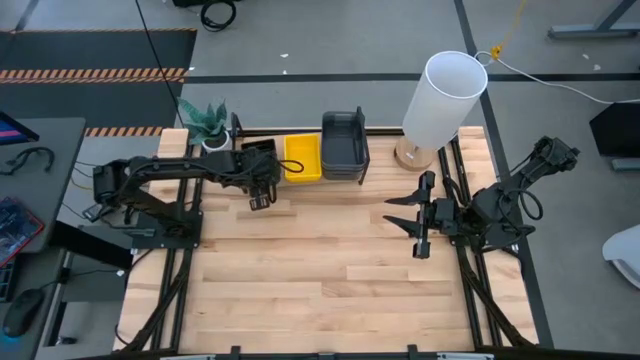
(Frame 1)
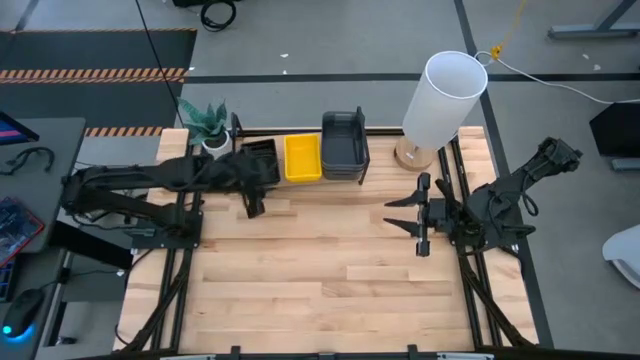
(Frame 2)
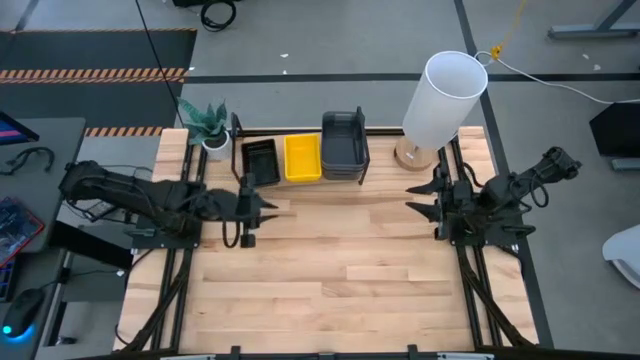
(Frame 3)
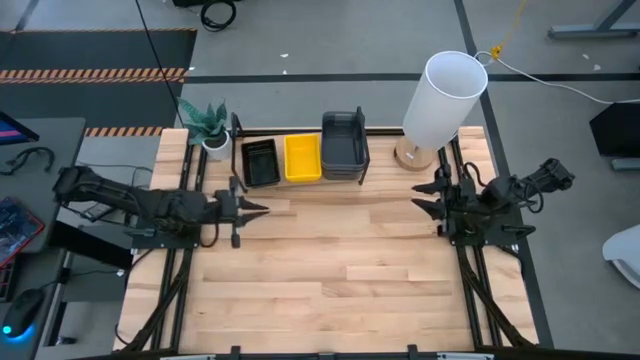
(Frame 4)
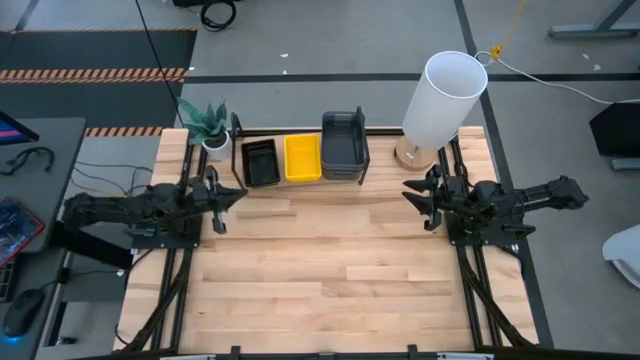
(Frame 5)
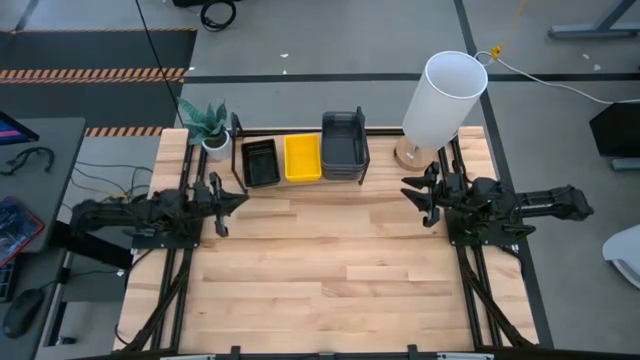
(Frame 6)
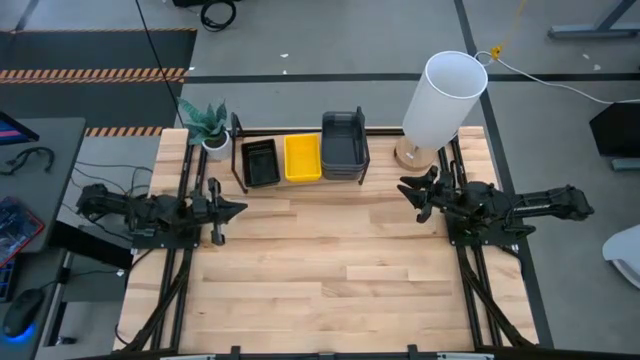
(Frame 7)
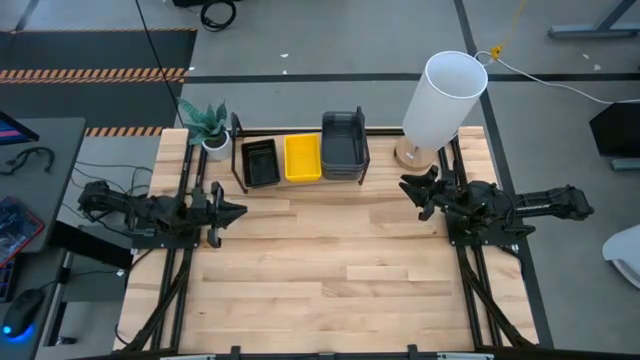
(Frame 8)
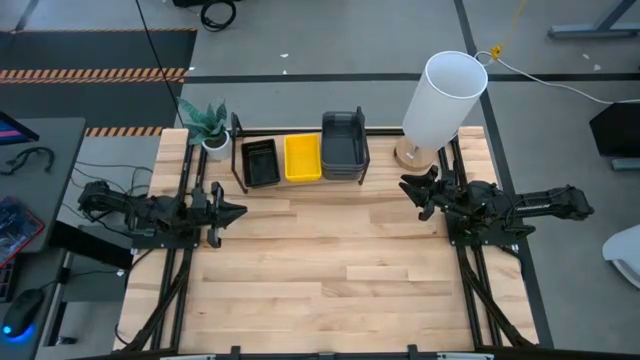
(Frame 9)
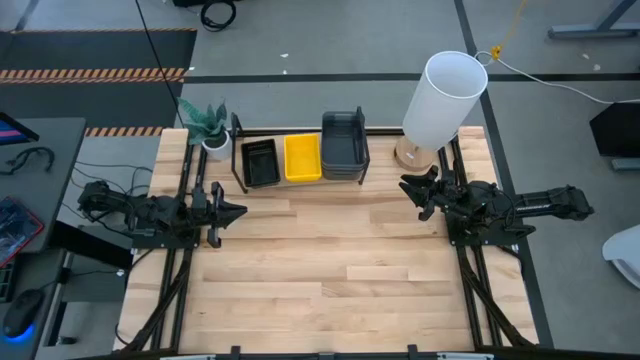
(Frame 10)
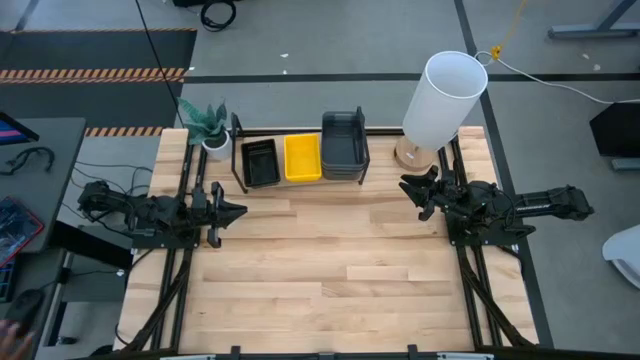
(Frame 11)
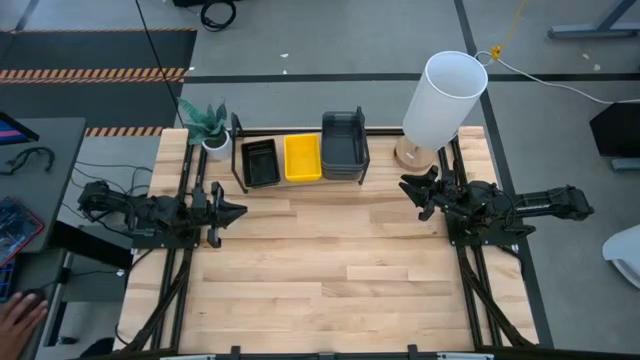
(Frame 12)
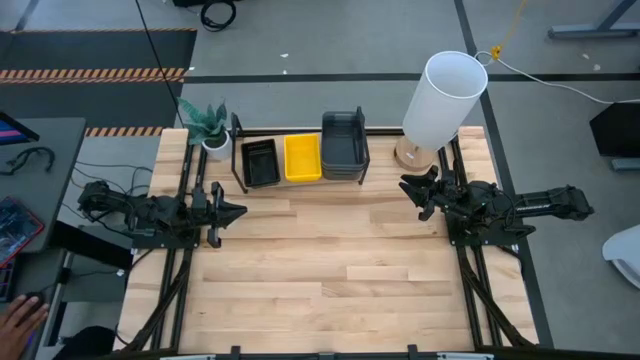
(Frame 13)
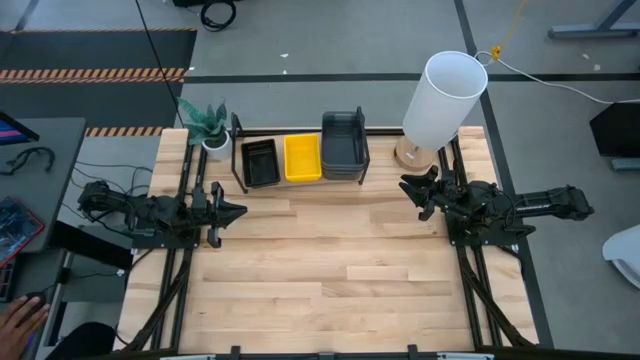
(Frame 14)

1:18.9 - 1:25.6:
Task: Stack baskets on shelf by color
Return to Home Position

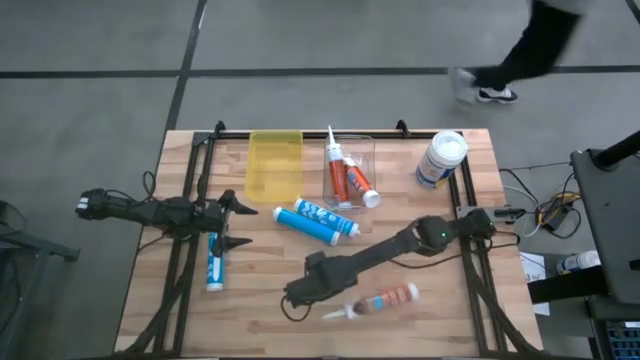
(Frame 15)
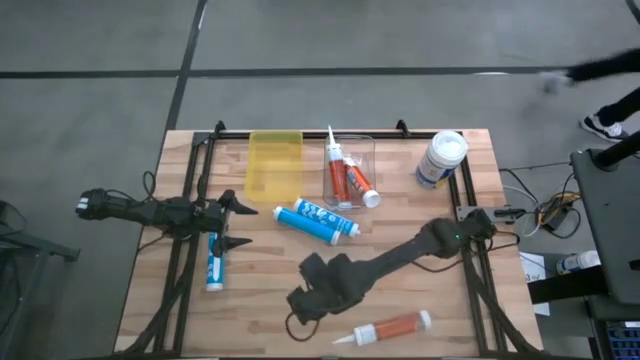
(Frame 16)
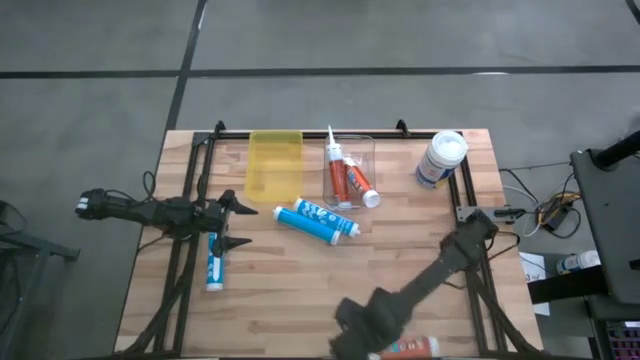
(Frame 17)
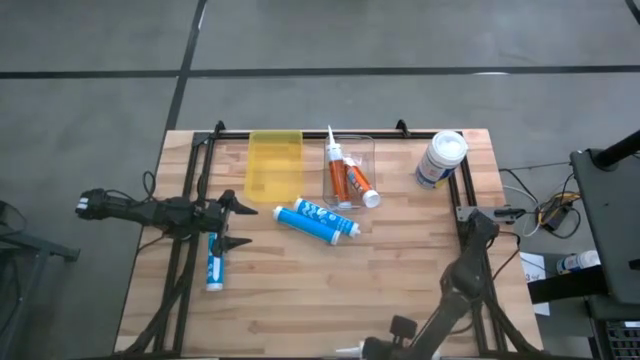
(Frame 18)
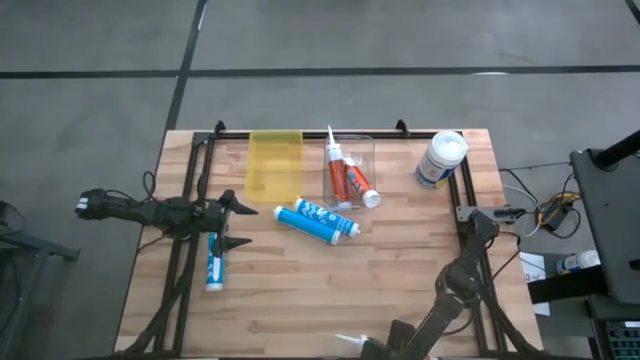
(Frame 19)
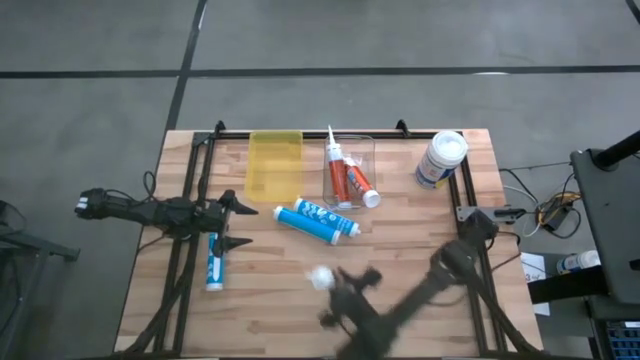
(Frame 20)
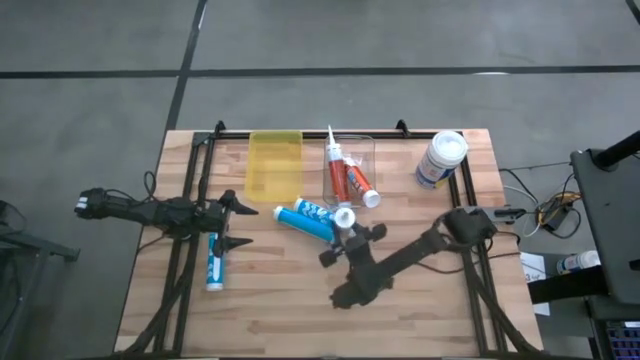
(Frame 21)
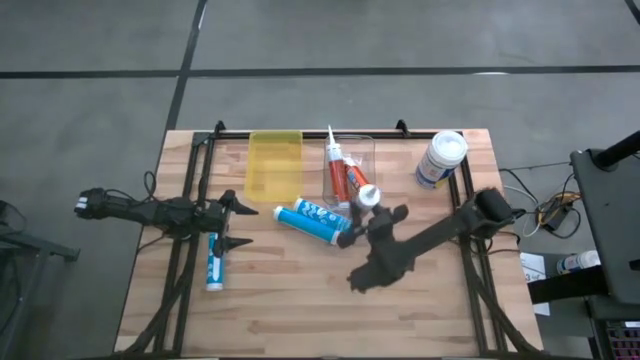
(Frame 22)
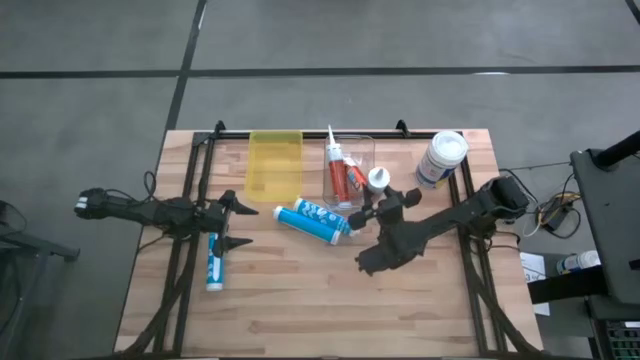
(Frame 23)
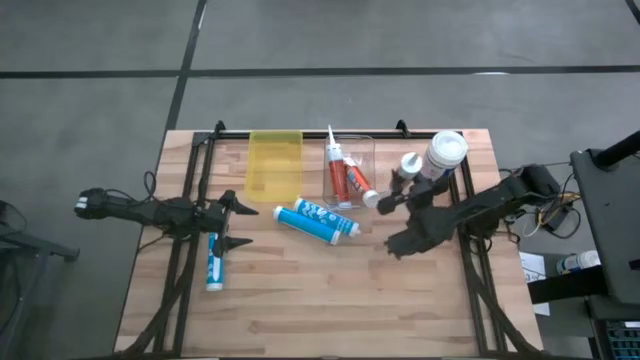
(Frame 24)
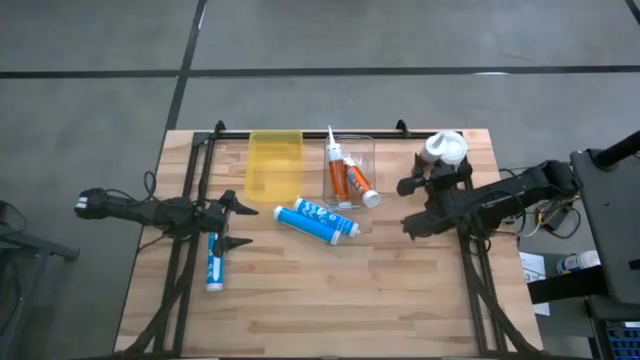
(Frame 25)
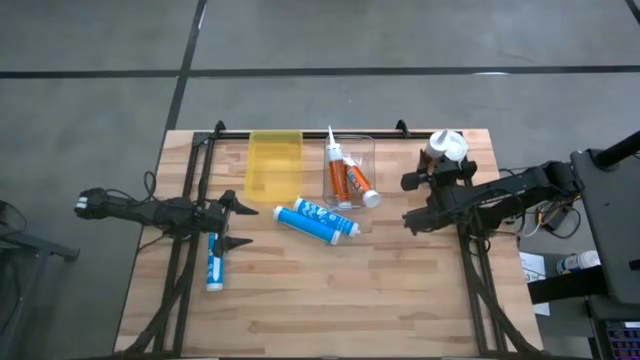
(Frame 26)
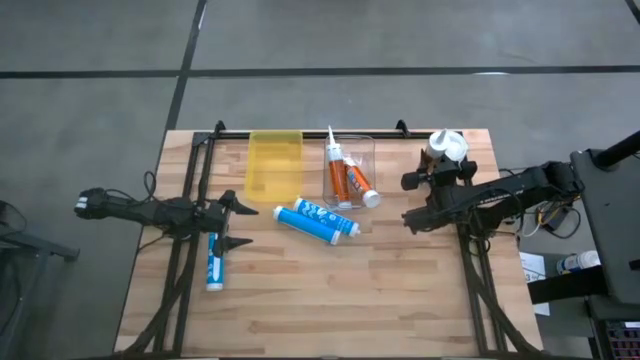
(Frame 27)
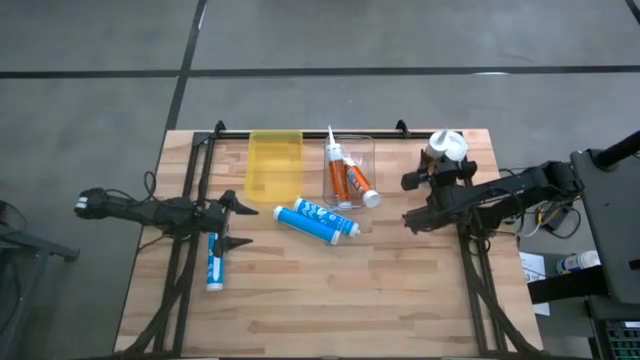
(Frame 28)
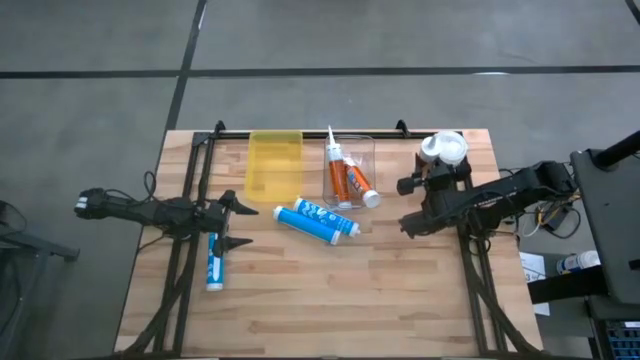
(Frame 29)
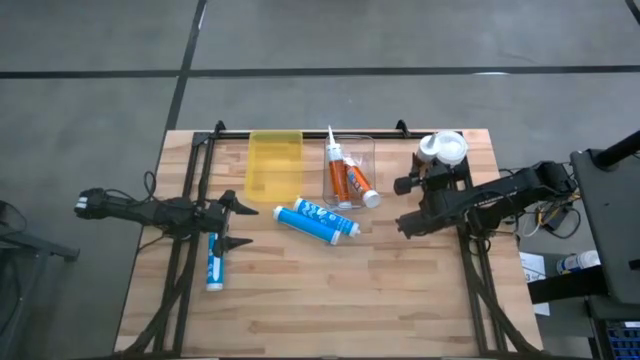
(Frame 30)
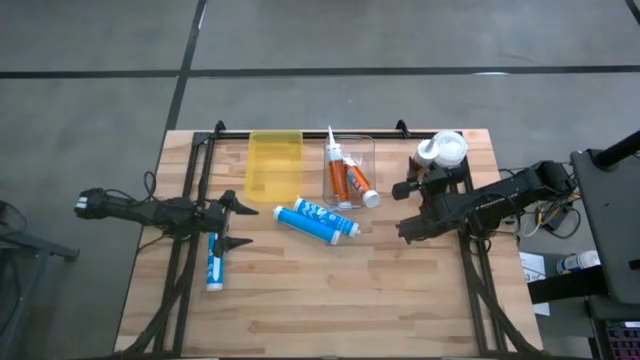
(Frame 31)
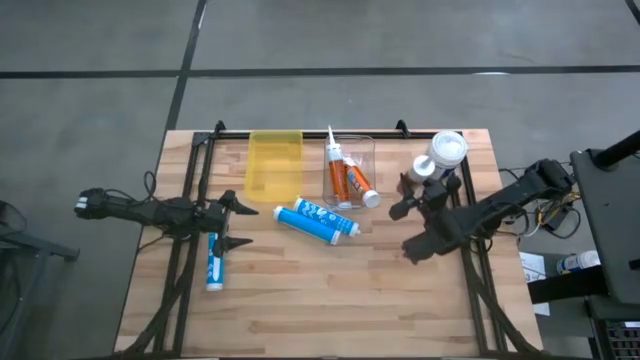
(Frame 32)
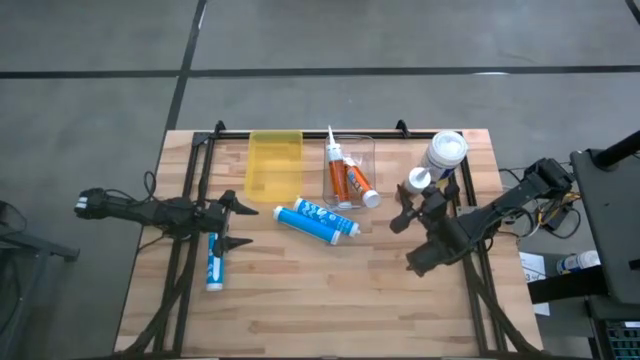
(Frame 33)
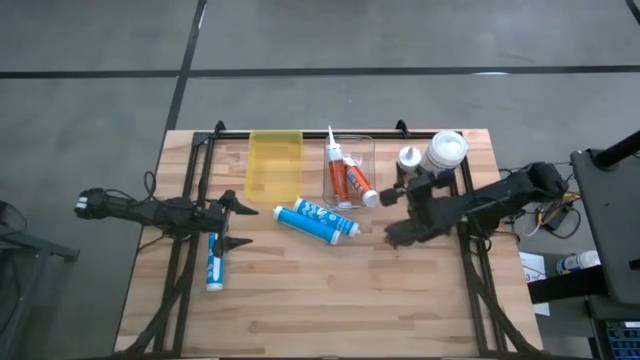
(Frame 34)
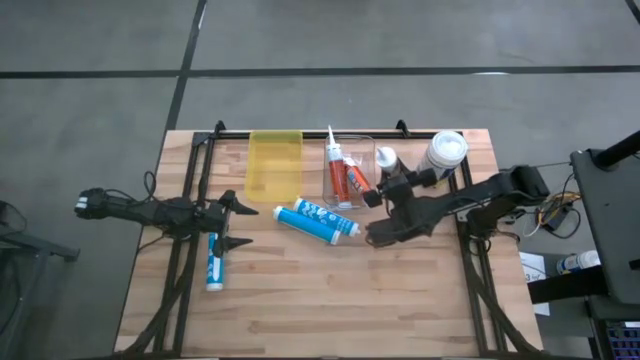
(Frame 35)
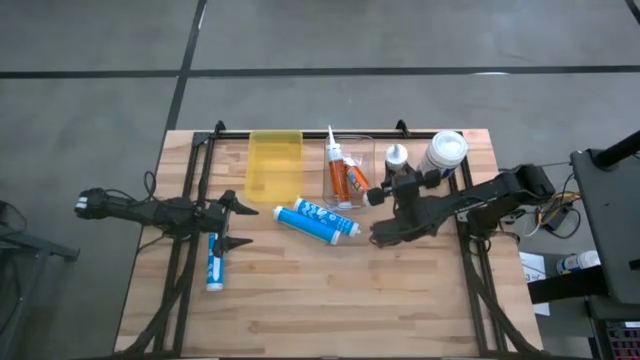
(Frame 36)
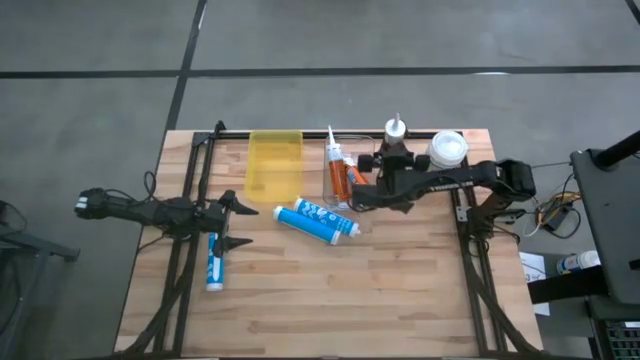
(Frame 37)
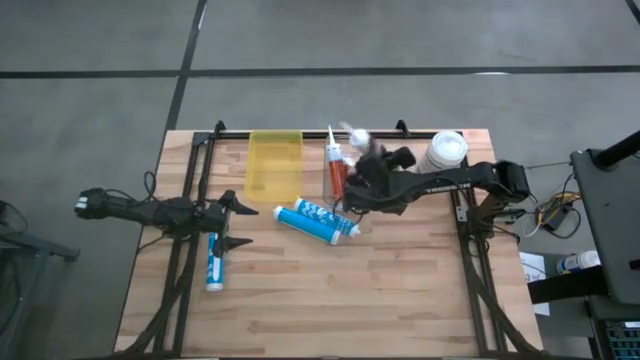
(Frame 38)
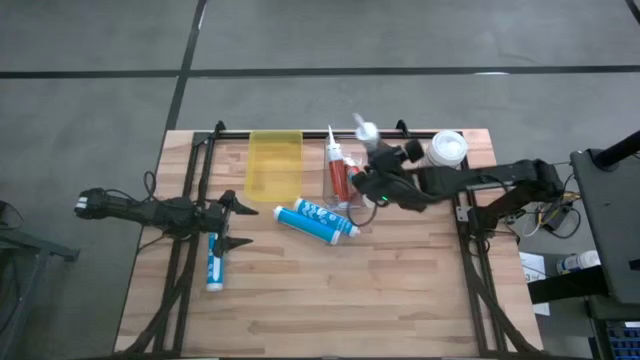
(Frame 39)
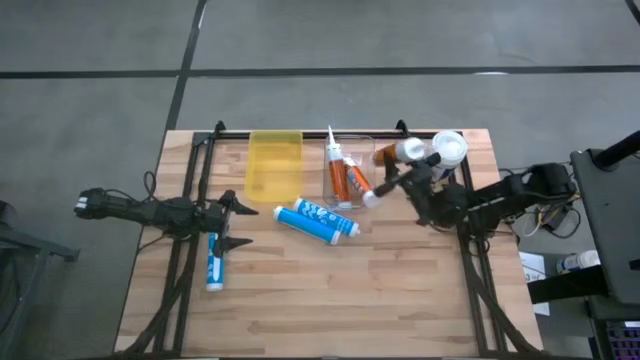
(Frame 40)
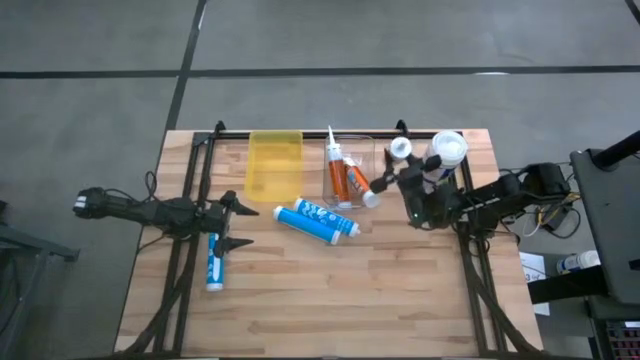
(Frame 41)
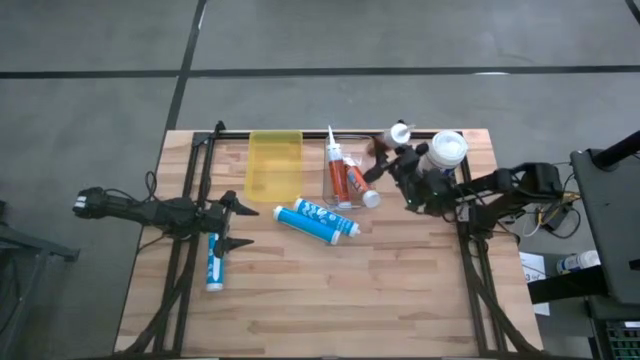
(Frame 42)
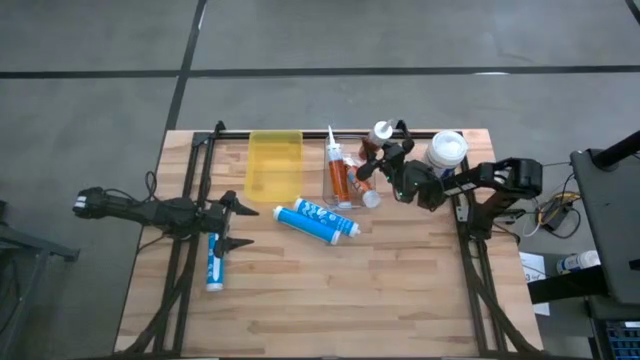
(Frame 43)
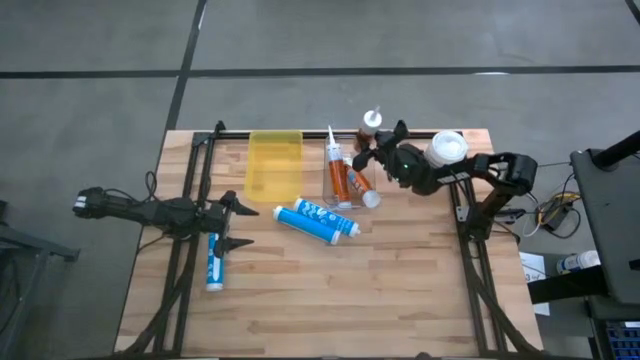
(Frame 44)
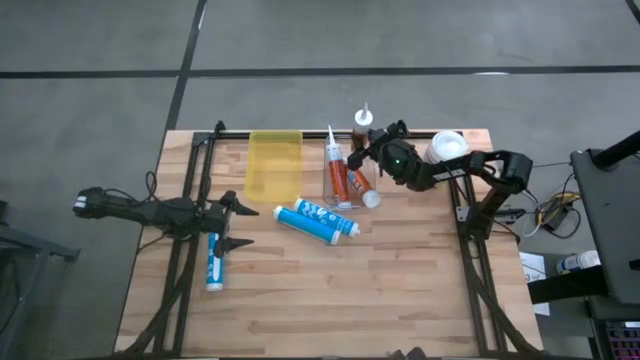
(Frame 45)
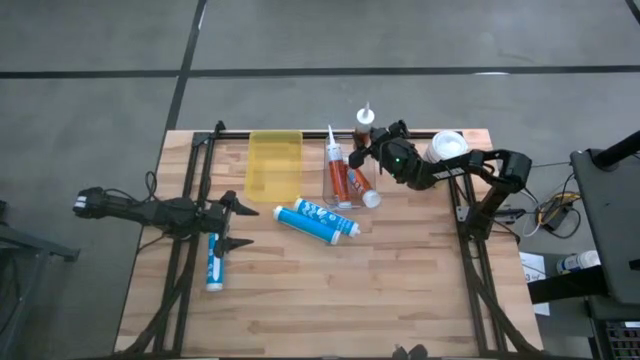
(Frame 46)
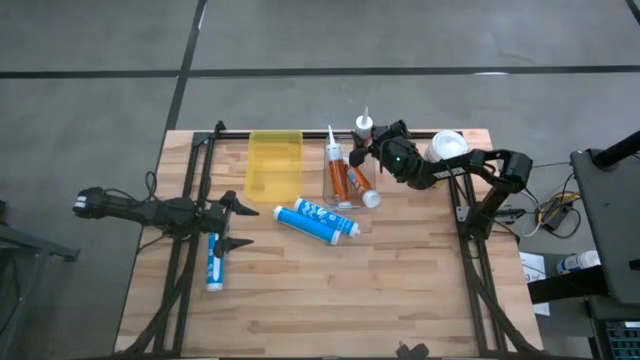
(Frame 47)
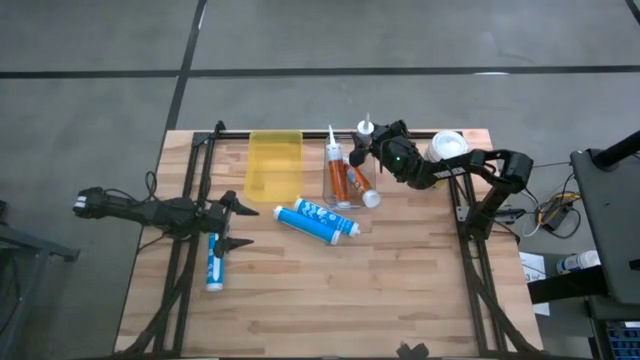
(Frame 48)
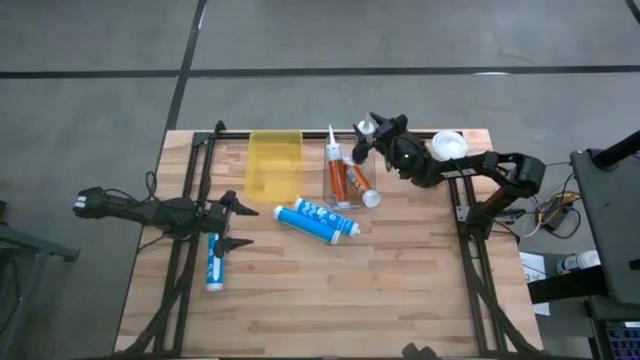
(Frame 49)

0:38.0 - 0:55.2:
Task: Pick & place silicon tubes, Sealant and Lysol wipes
Put the orange sealant into the transparent bin
